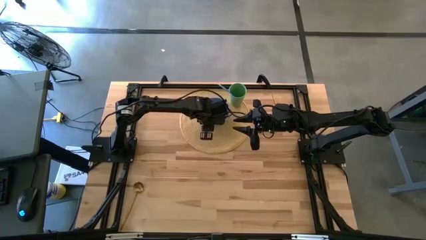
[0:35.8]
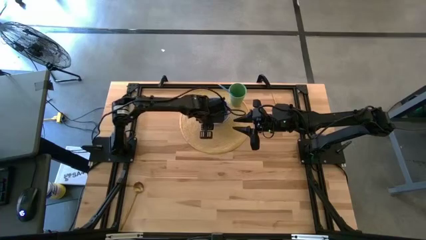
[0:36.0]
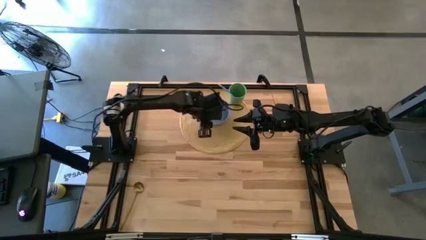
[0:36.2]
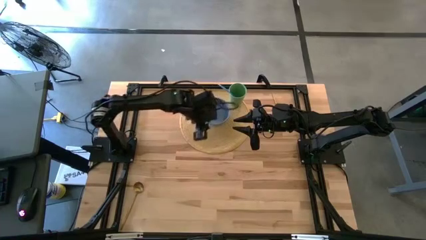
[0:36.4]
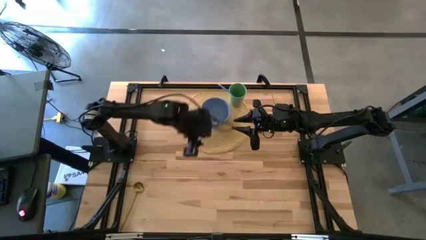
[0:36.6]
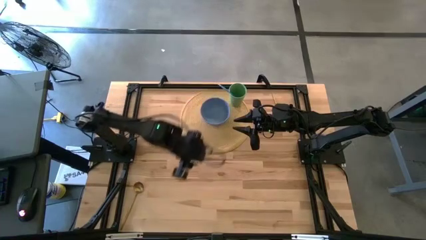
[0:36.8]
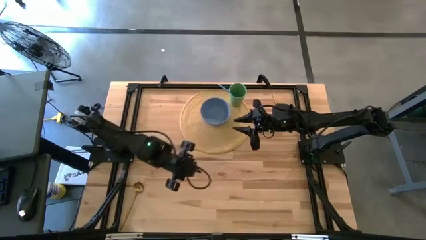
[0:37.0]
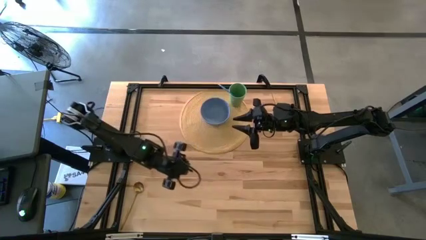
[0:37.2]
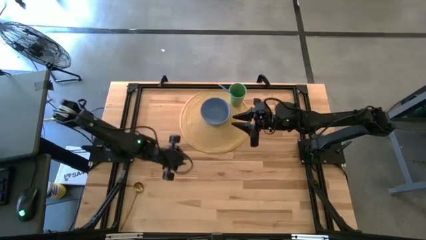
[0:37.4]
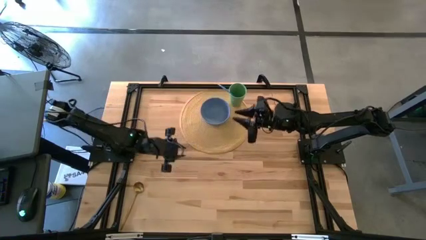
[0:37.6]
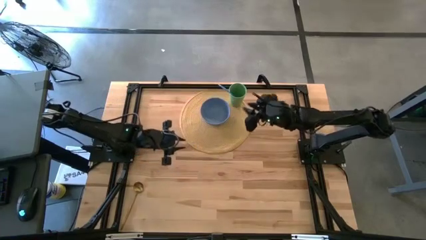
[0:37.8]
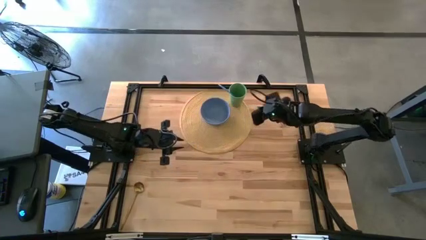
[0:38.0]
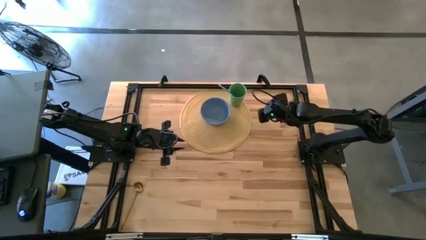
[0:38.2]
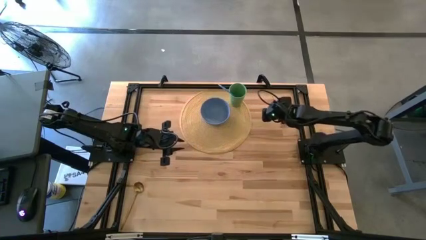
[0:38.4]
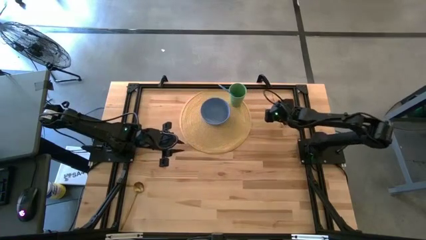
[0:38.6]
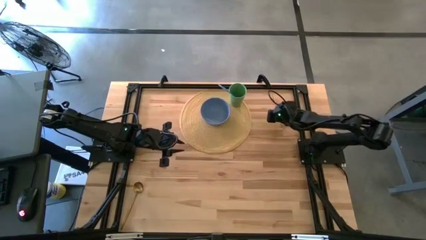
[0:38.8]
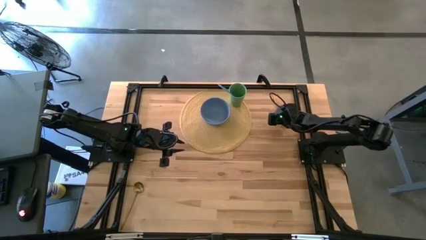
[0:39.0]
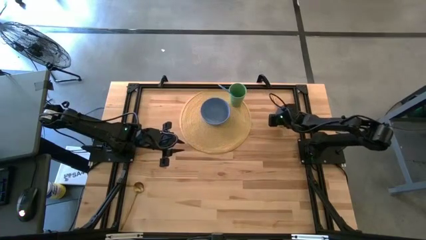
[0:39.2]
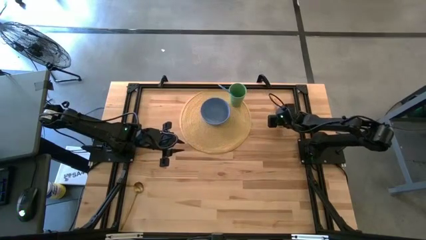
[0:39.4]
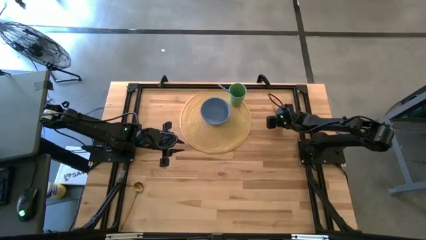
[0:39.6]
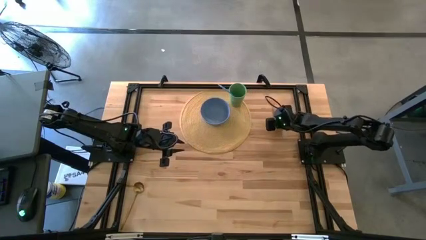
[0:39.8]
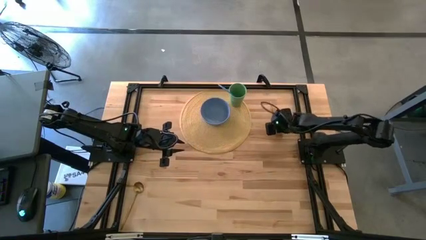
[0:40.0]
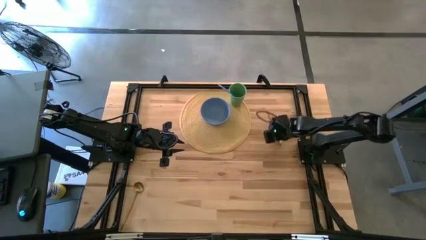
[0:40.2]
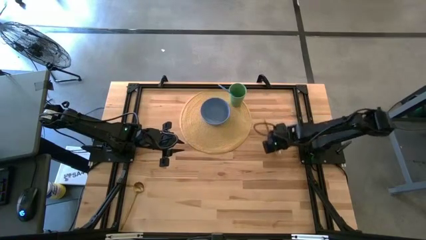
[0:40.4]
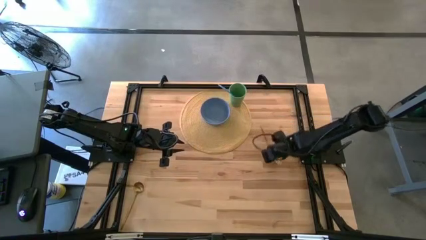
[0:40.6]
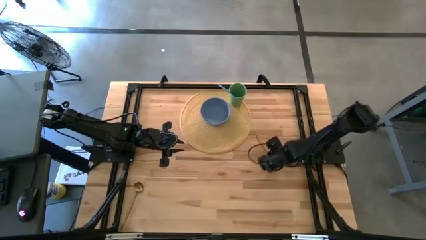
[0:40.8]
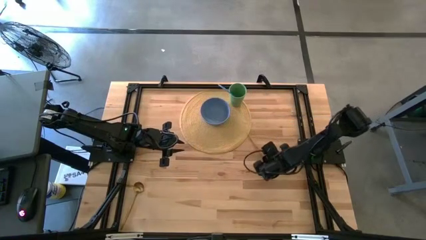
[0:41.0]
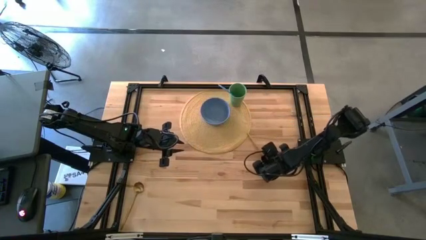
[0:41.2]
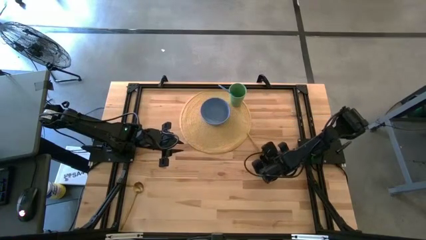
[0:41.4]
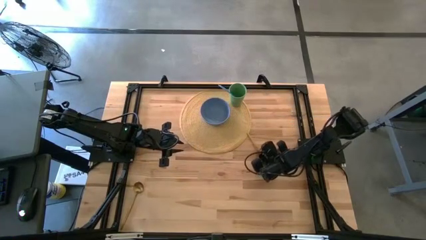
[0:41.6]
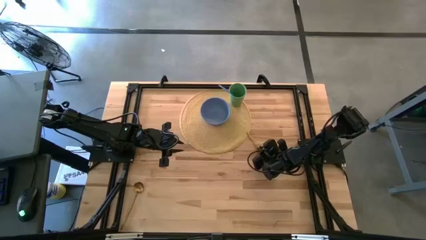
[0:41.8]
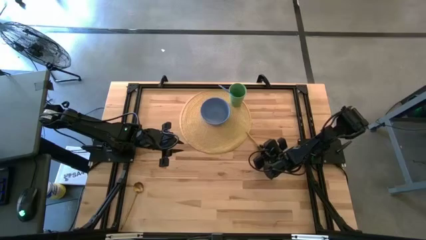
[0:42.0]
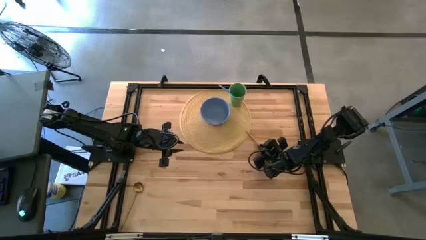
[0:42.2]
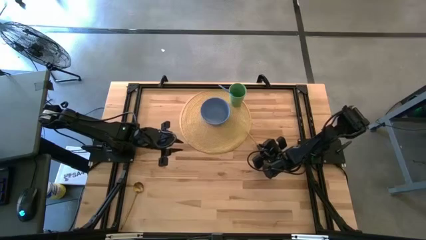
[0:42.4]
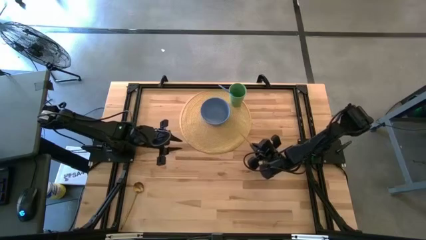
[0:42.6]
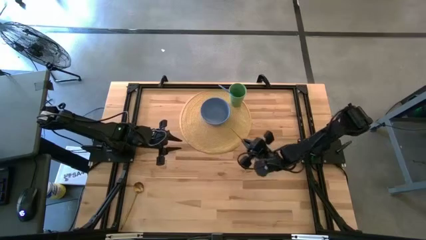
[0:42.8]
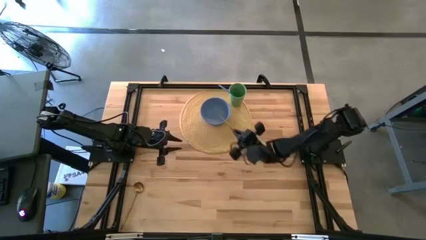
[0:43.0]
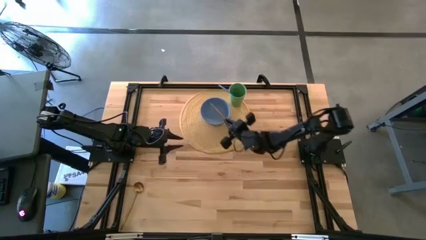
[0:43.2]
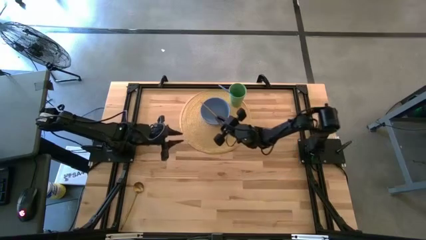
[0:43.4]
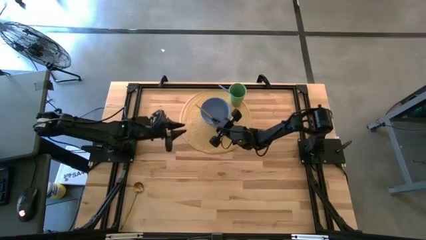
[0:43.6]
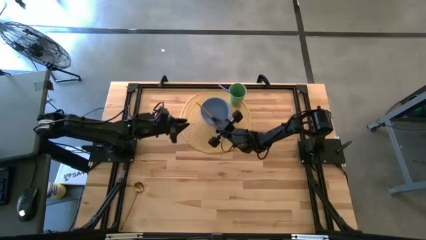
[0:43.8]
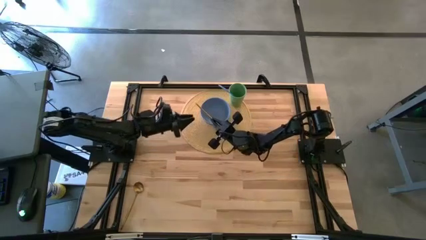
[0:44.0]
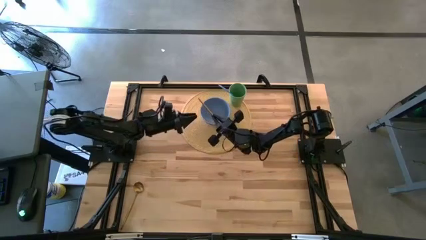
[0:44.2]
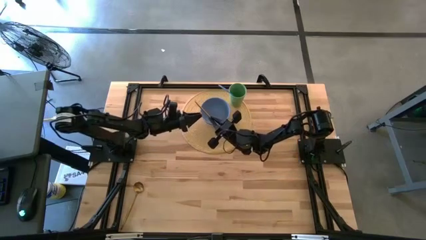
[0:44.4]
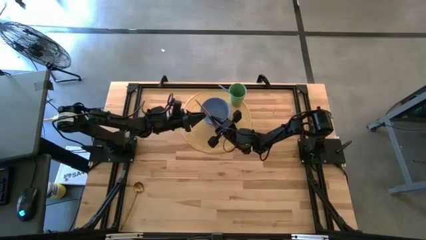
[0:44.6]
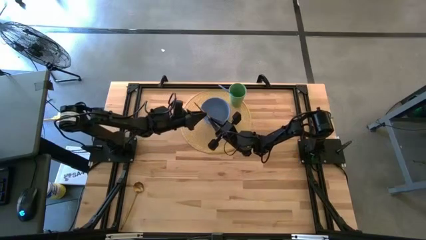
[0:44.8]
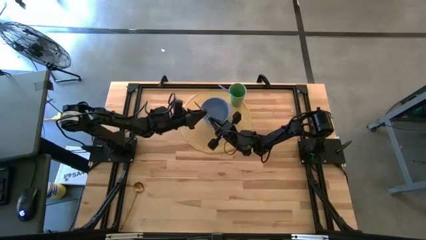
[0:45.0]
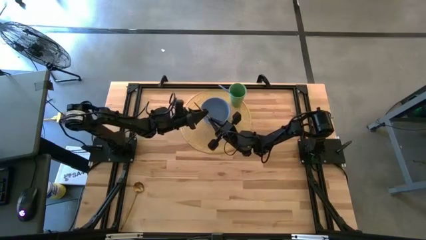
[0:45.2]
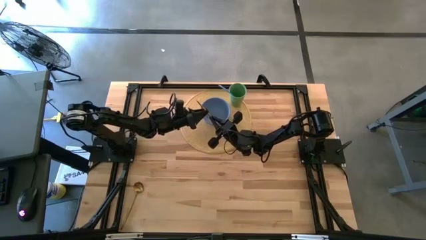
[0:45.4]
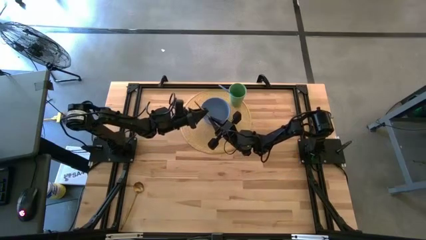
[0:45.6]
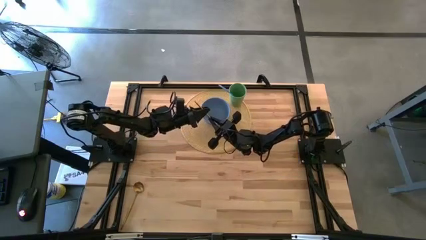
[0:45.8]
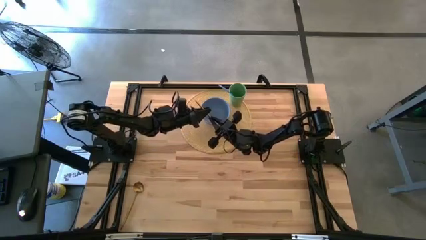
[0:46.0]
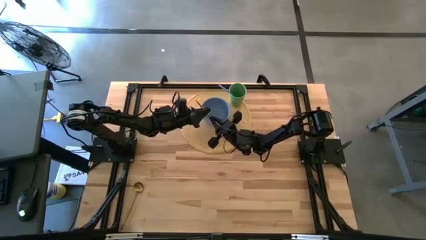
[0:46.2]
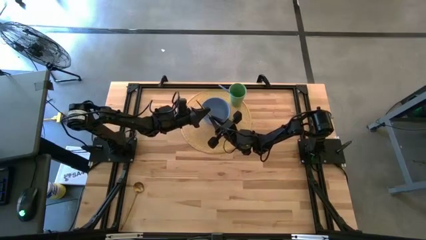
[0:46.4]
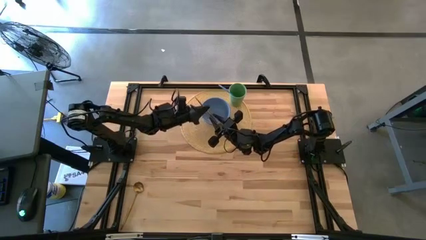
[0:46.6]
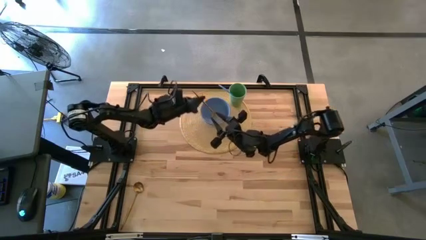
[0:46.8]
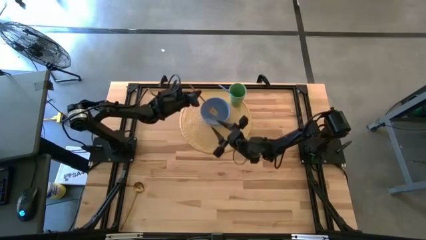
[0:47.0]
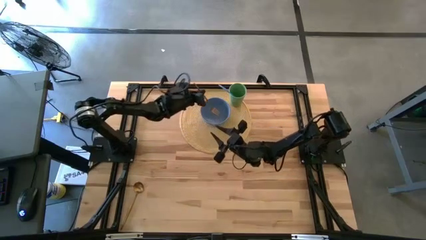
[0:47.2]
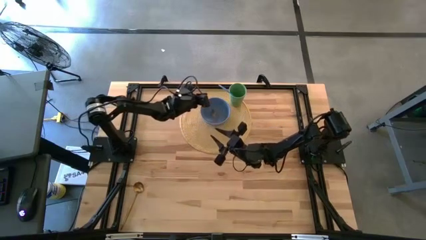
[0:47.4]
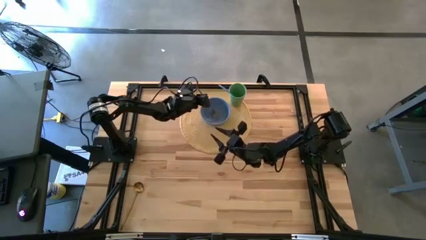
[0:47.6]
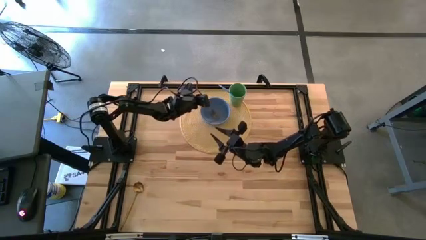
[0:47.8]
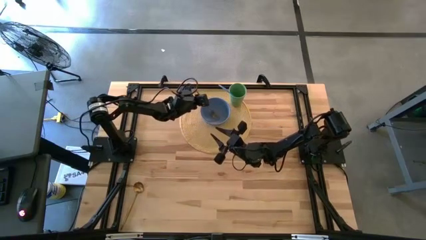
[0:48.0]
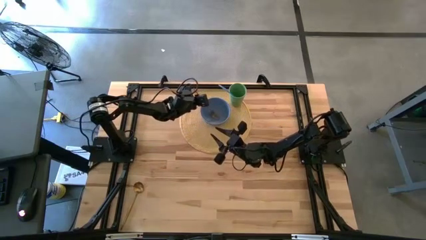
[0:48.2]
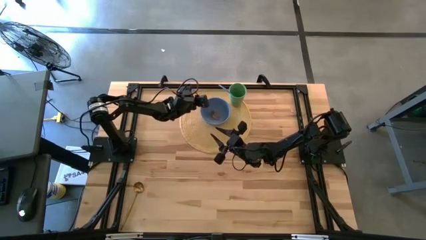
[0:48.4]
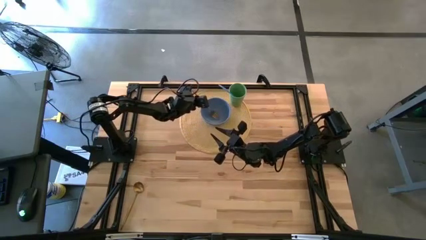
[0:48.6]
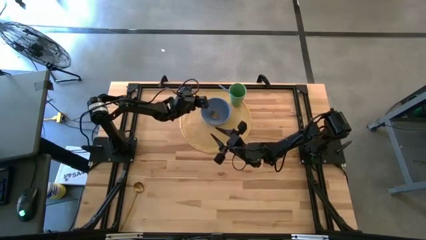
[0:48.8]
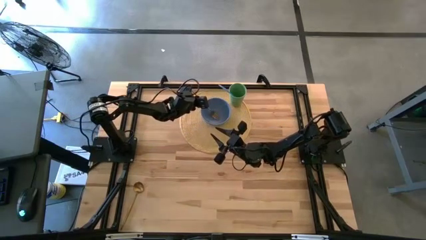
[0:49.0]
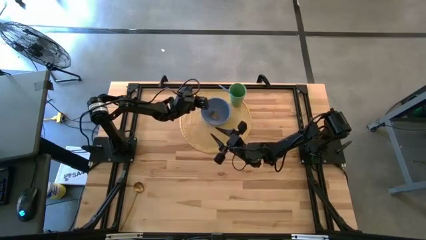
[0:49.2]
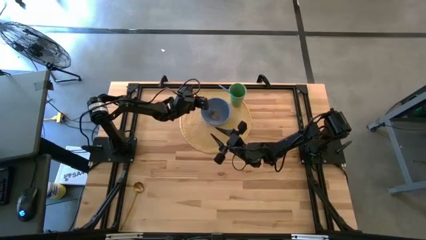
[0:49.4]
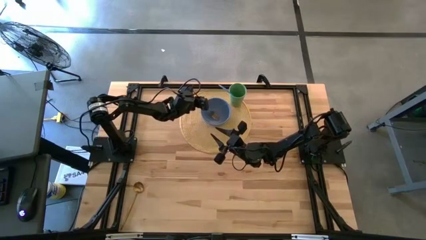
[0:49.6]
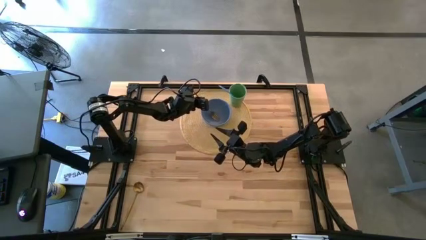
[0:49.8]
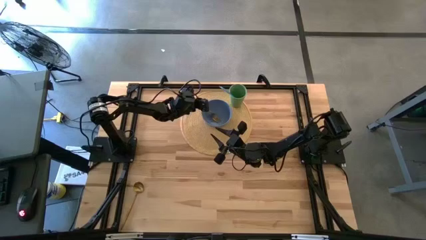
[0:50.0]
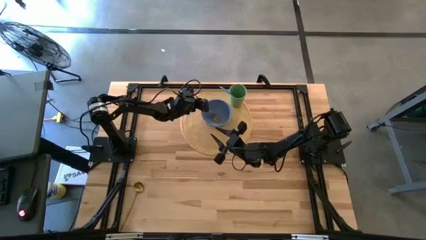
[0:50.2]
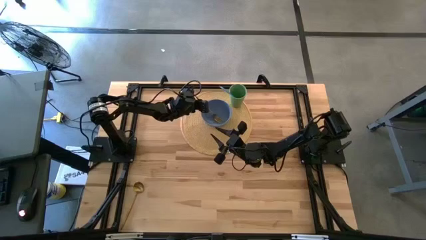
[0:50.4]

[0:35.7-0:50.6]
Task: Pick & Place Utensil
Put the gold fork into the blue bowl on the brown mat
